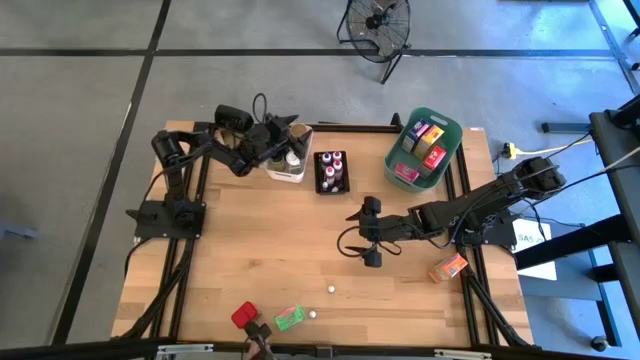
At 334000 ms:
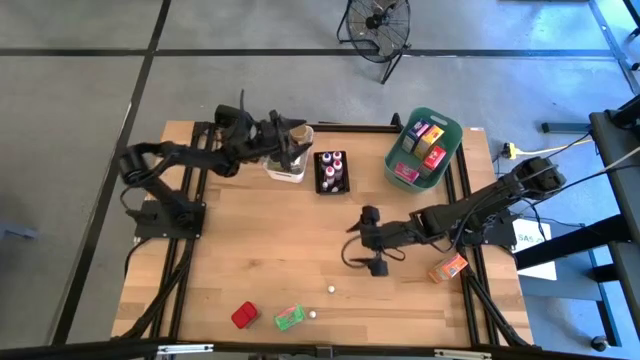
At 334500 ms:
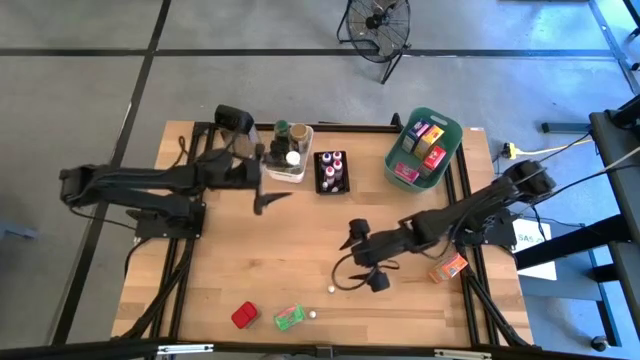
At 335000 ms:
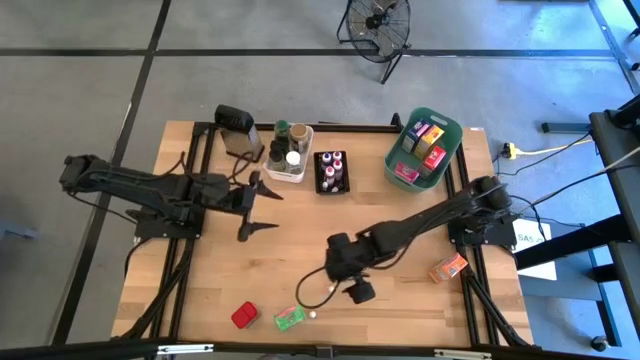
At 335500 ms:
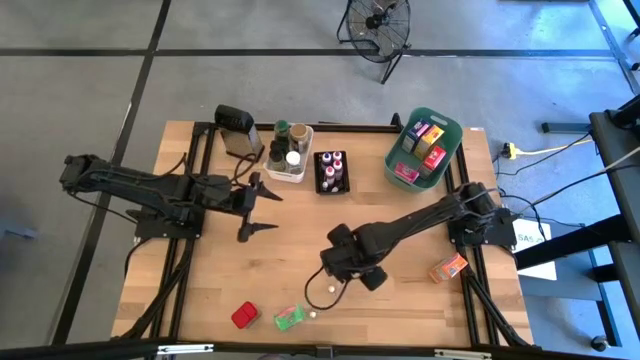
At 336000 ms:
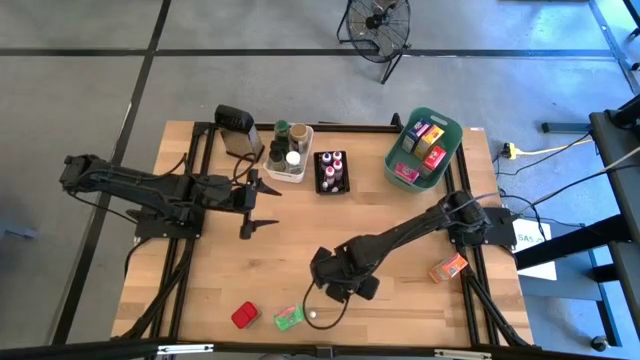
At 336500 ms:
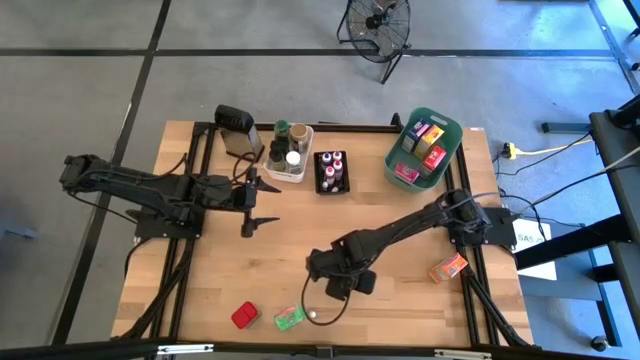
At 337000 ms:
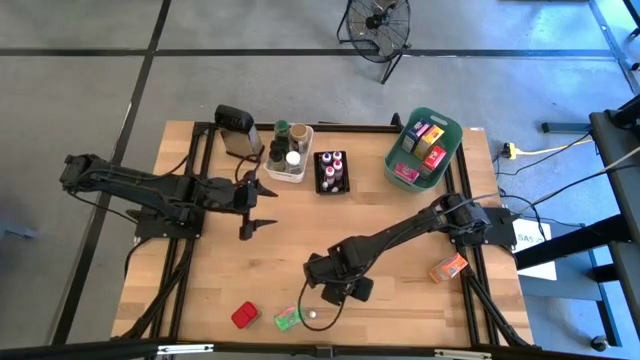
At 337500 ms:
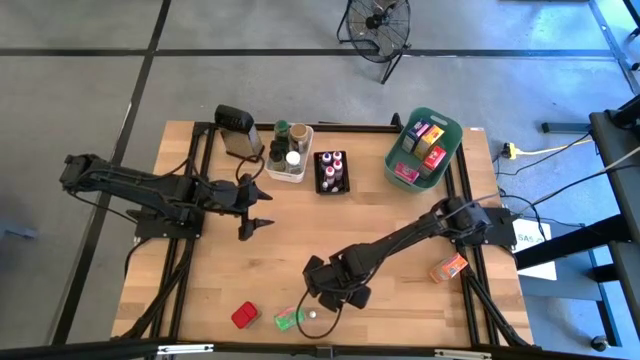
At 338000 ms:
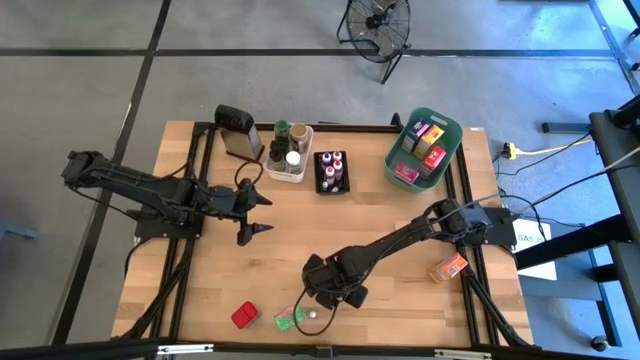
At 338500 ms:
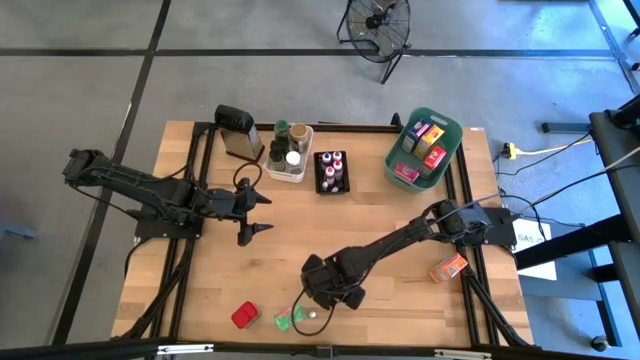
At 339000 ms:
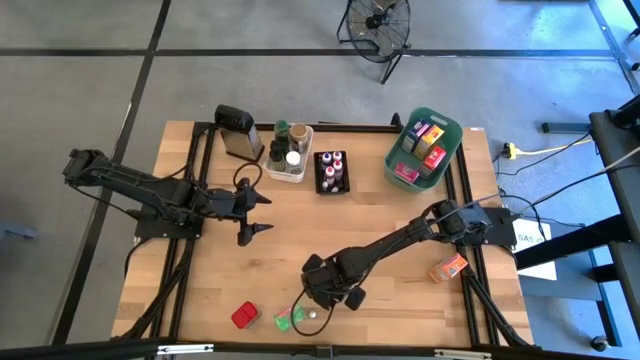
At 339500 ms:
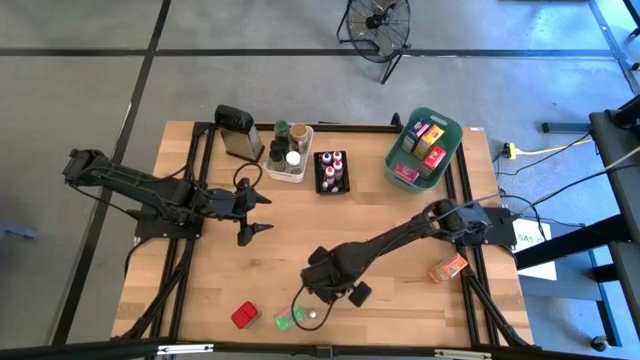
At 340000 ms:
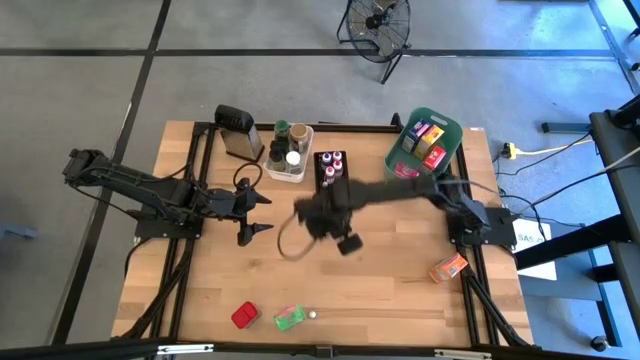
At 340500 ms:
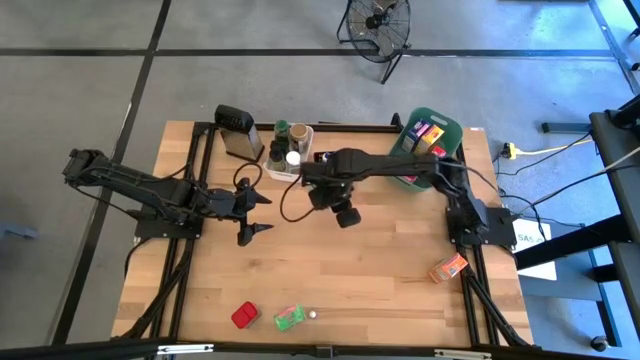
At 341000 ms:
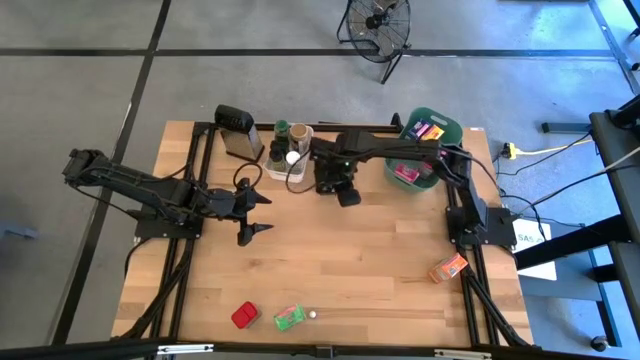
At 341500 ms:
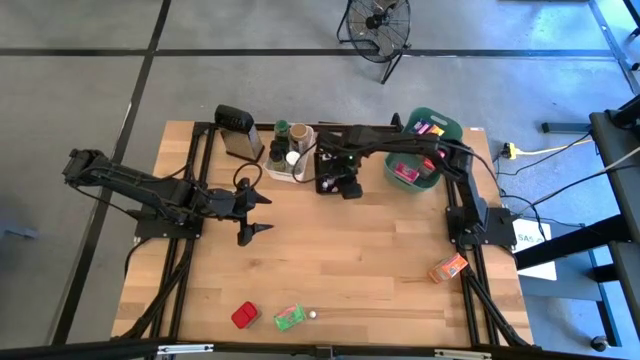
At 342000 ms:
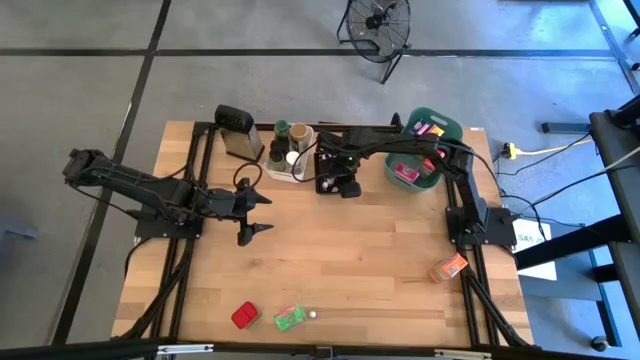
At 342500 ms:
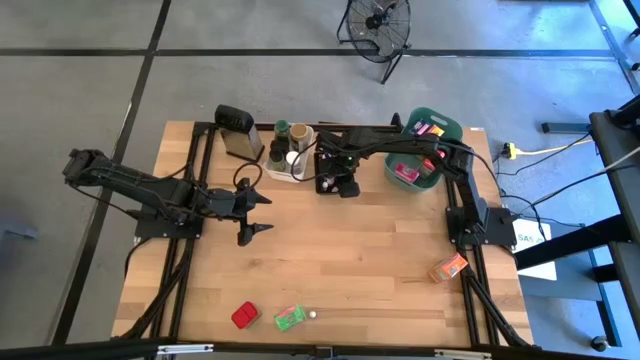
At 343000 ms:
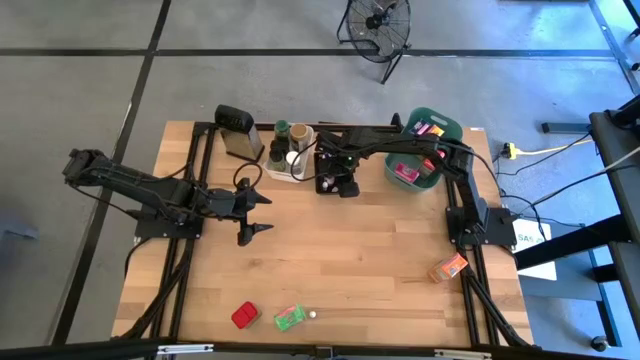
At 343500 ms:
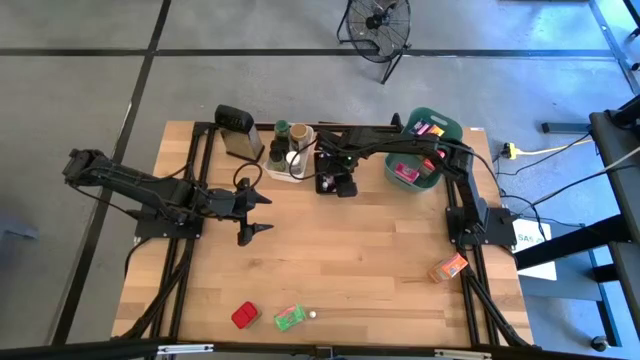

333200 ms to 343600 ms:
Task: Pick & Place Kitchen Items
Put the small green food coloring bottle into the black bin

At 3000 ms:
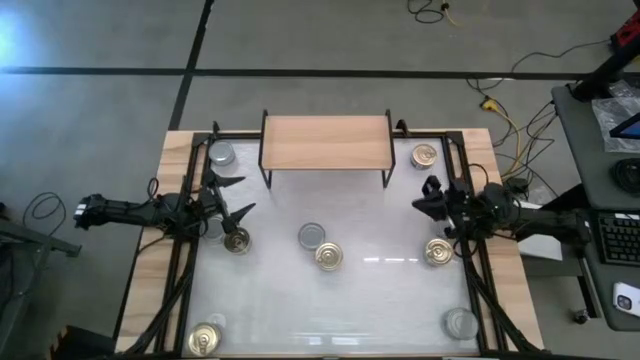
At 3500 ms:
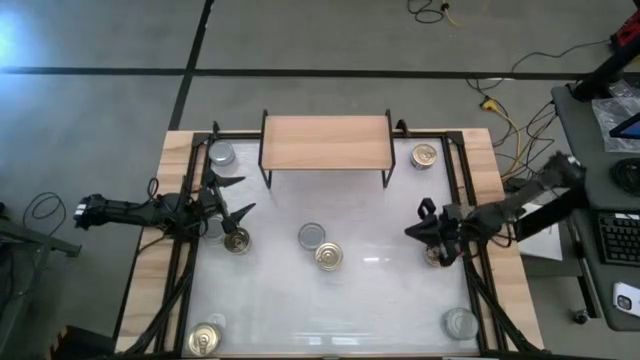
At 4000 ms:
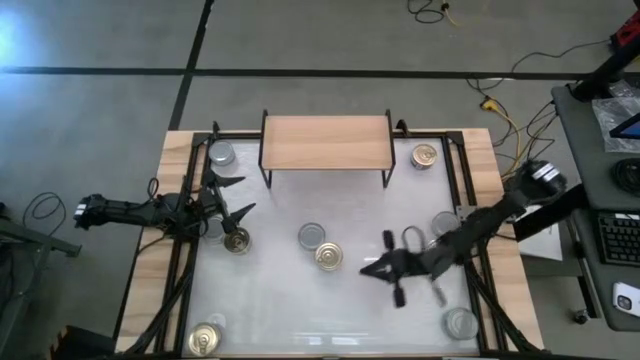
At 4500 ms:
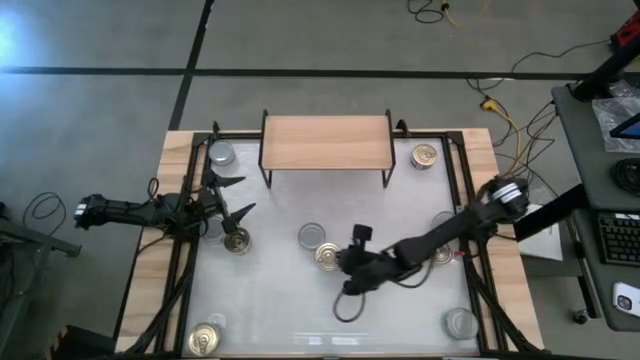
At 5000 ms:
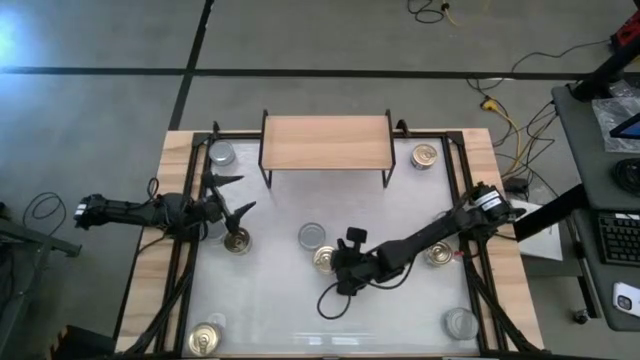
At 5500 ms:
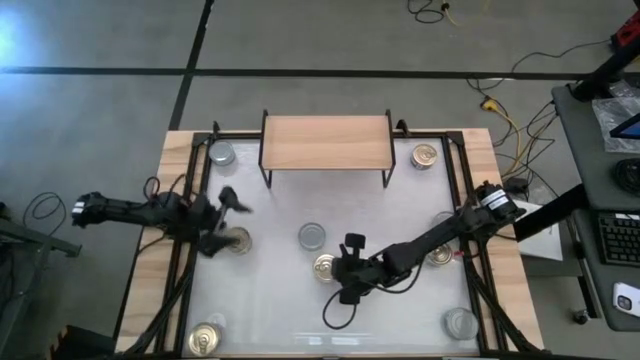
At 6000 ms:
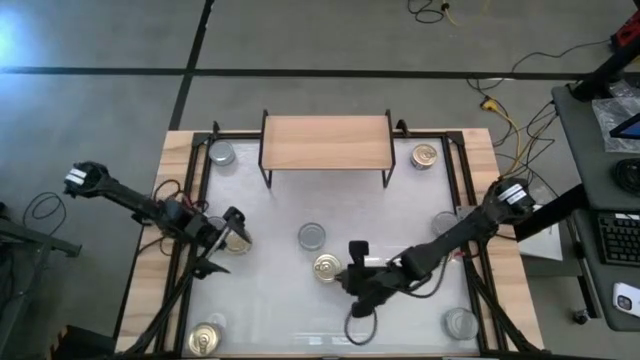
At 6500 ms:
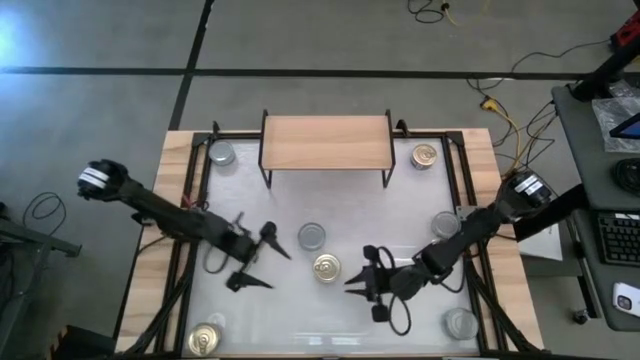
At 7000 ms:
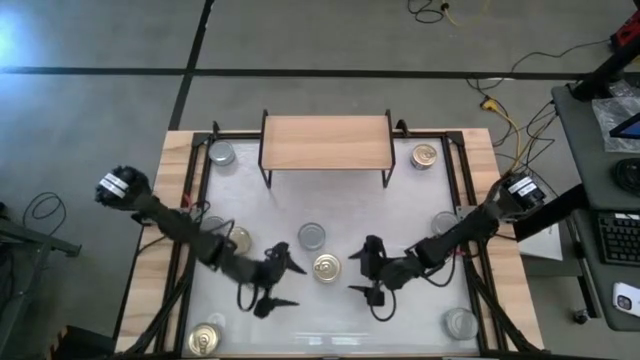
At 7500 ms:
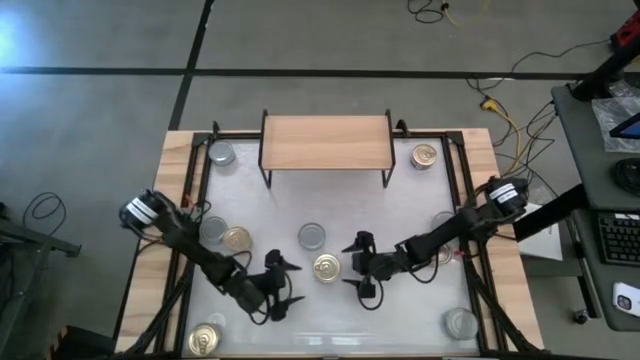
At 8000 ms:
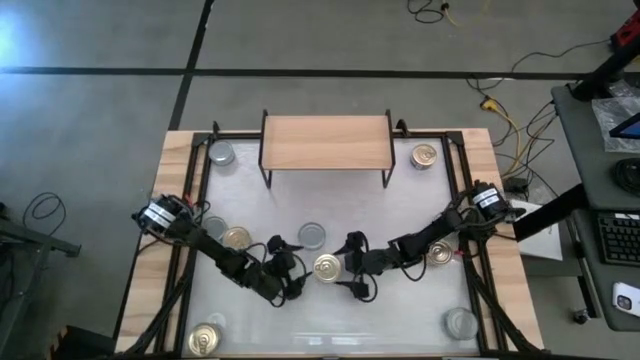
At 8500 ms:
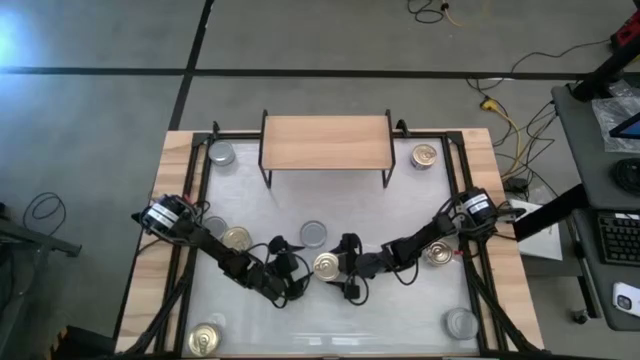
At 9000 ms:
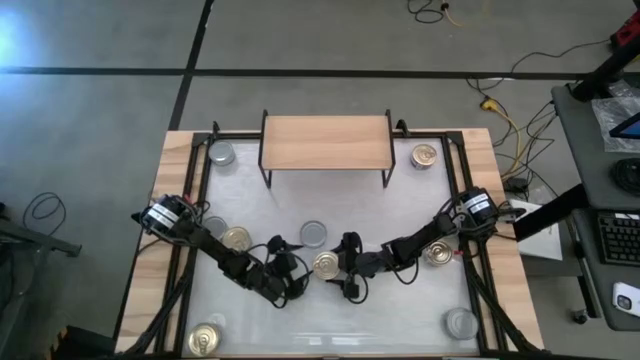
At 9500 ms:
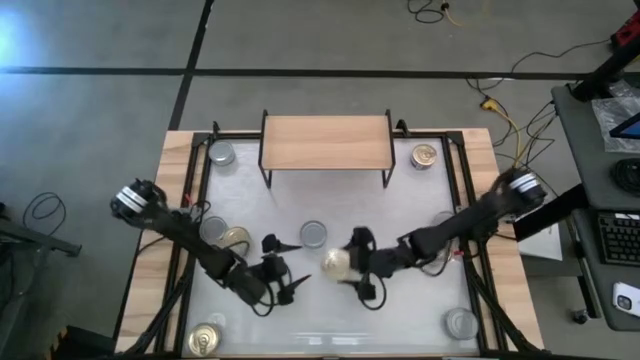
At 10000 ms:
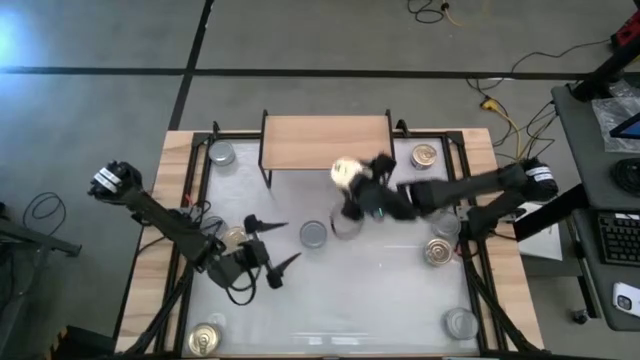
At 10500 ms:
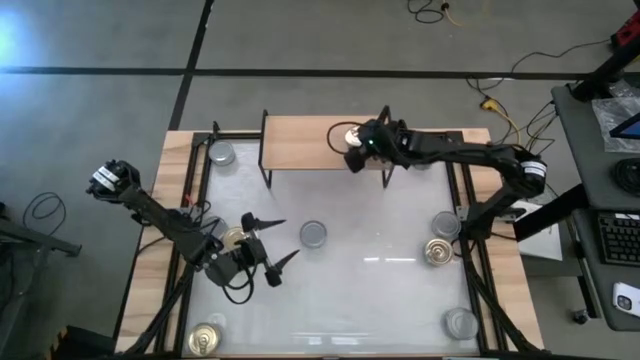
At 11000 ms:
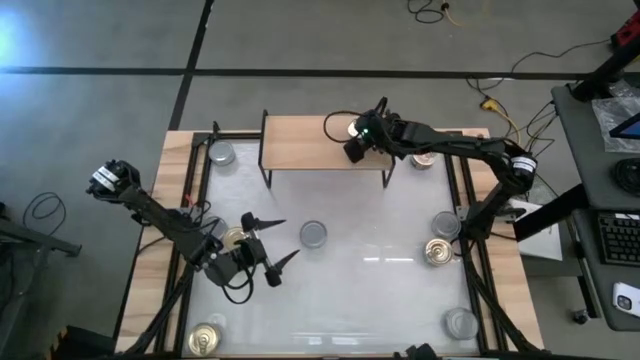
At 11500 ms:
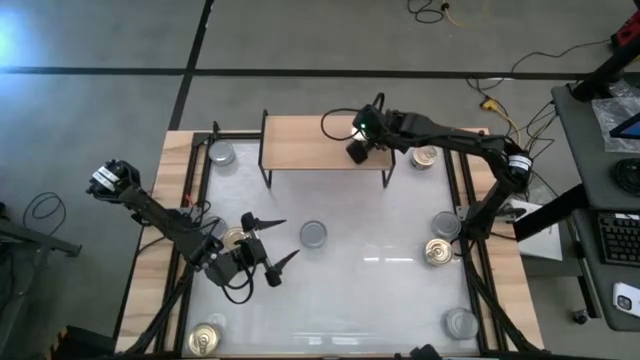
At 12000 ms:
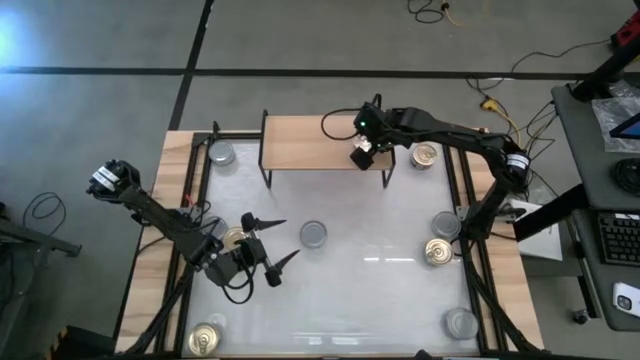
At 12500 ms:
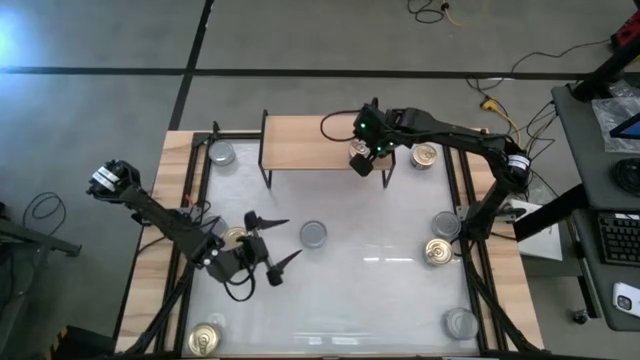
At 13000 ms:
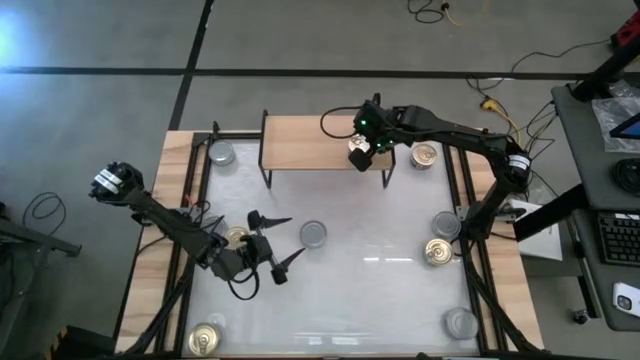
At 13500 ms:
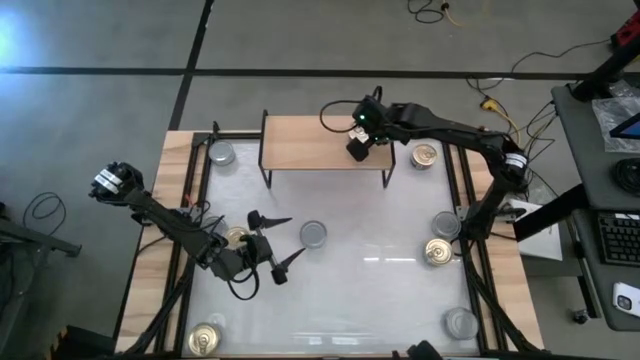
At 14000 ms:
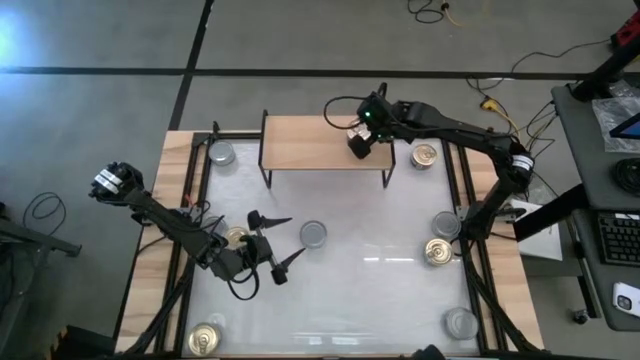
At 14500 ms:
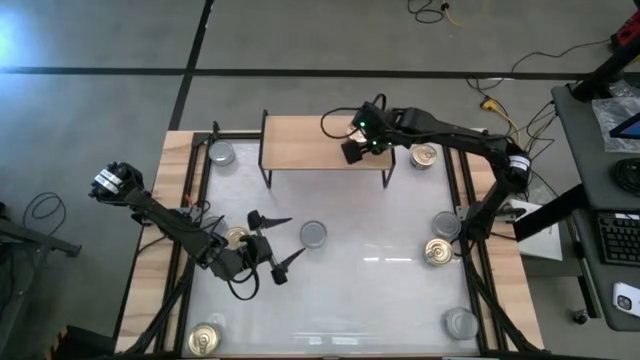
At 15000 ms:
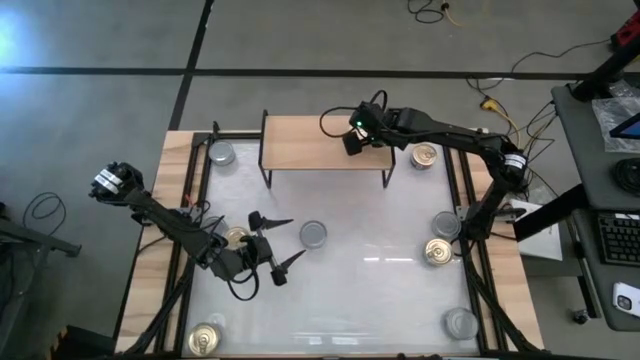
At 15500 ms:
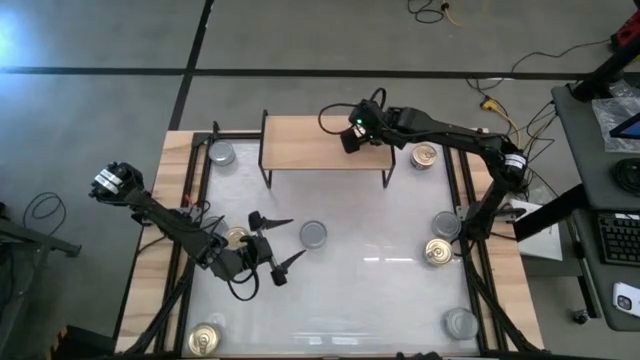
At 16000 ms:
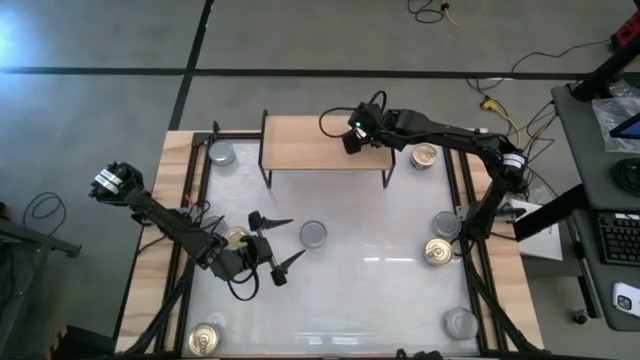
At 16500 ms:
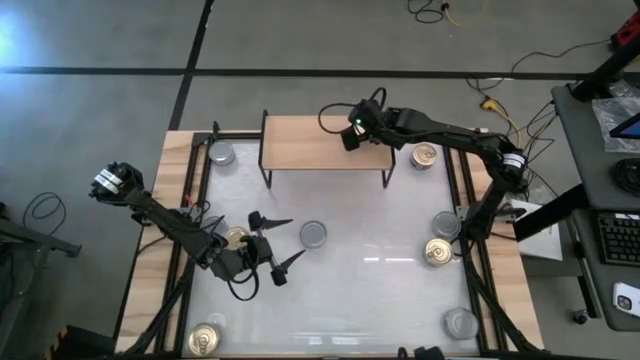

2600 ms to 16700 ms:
Task: Stack canned seafood by type on shelf
Put the blue tuna can on the shelf
